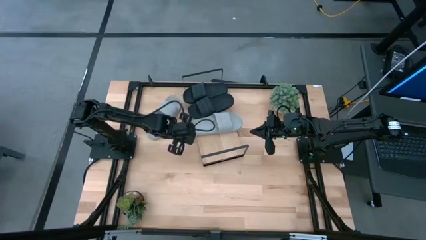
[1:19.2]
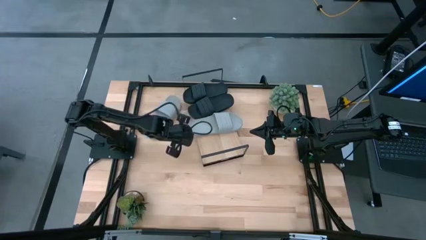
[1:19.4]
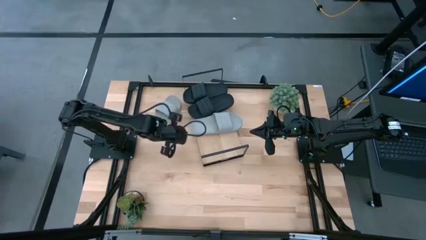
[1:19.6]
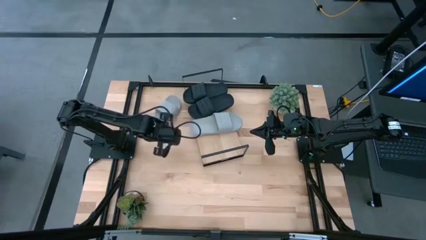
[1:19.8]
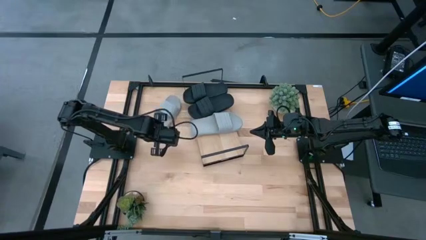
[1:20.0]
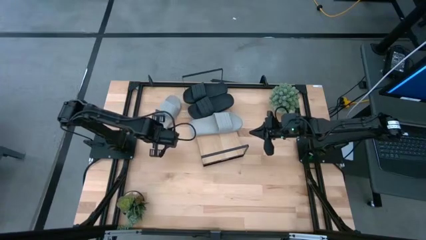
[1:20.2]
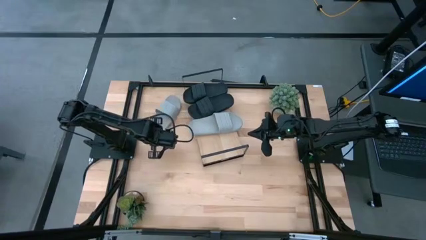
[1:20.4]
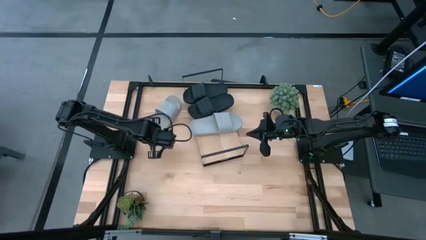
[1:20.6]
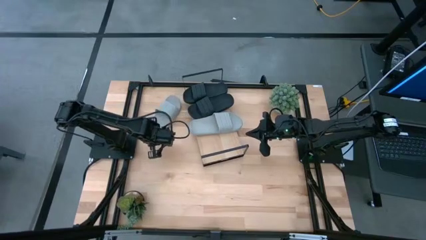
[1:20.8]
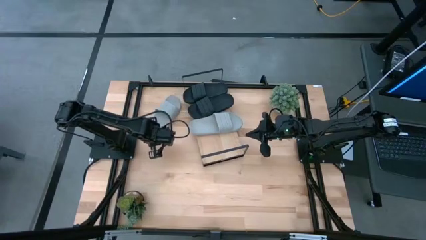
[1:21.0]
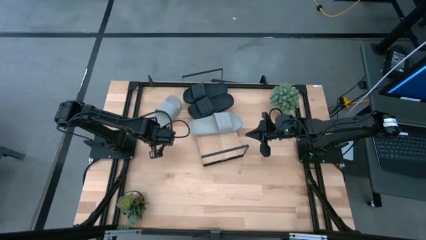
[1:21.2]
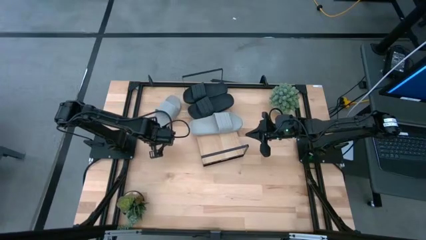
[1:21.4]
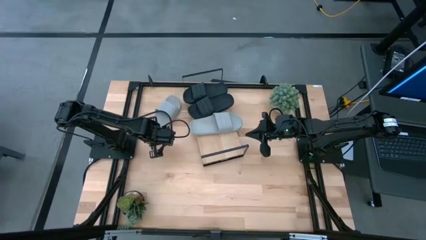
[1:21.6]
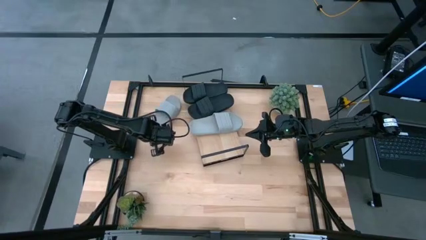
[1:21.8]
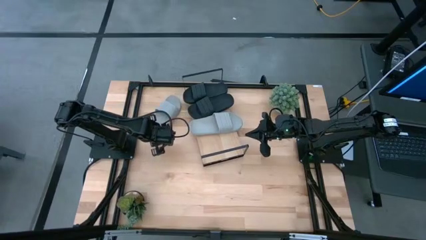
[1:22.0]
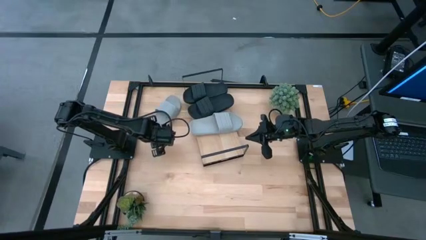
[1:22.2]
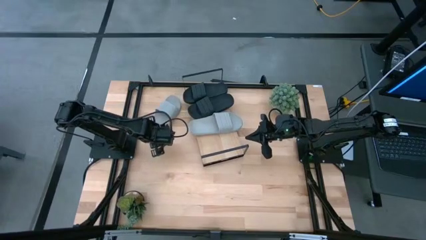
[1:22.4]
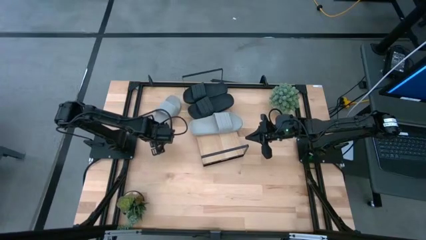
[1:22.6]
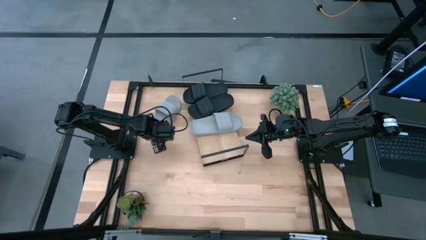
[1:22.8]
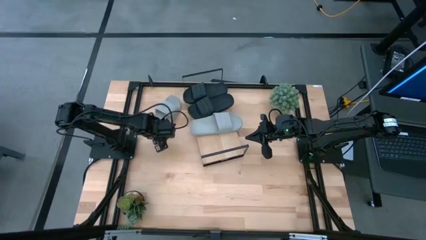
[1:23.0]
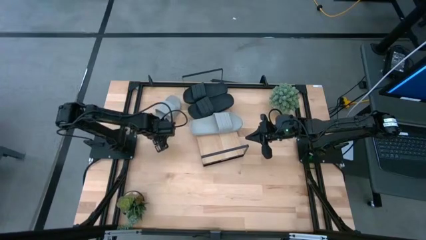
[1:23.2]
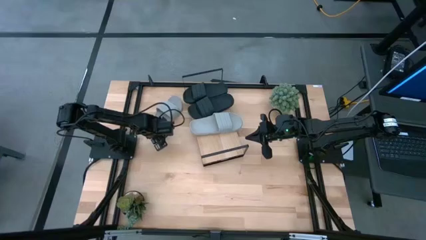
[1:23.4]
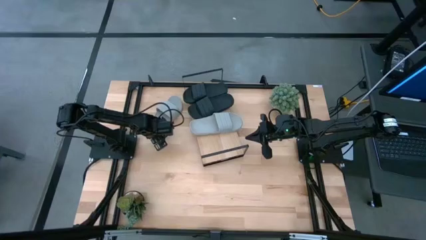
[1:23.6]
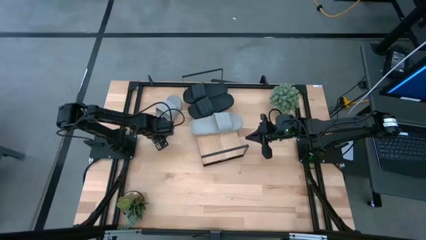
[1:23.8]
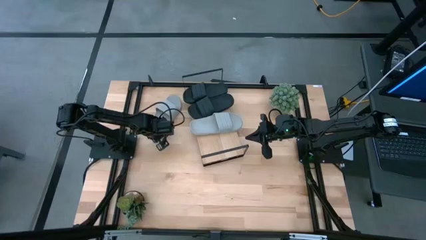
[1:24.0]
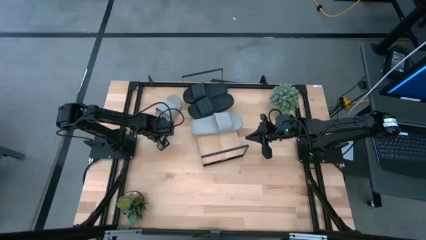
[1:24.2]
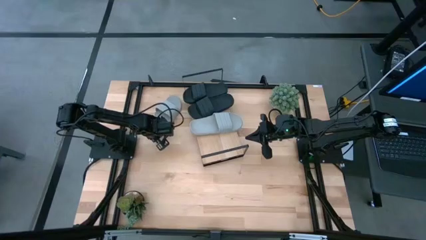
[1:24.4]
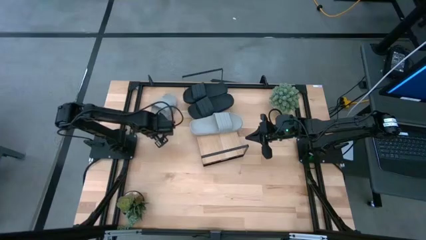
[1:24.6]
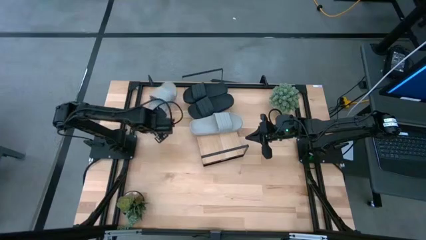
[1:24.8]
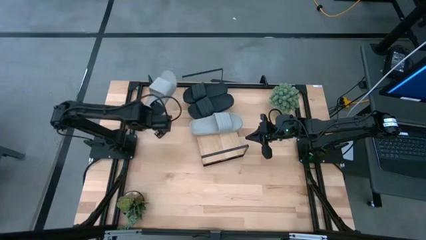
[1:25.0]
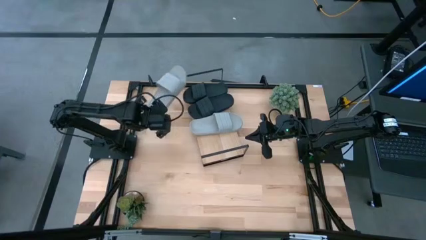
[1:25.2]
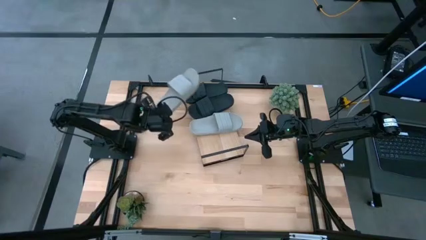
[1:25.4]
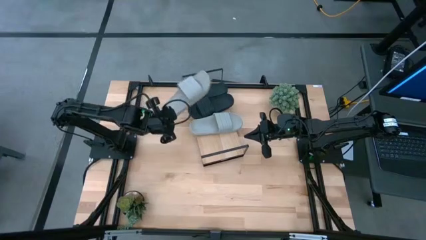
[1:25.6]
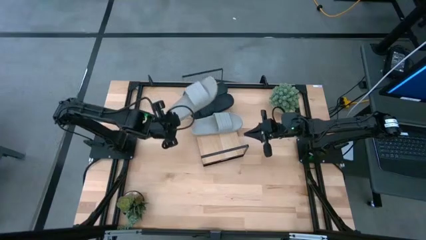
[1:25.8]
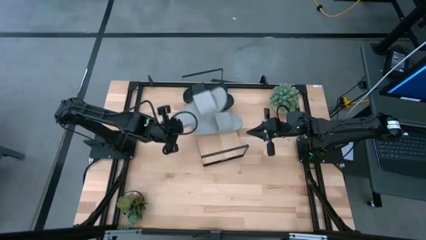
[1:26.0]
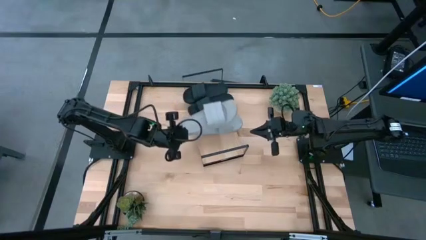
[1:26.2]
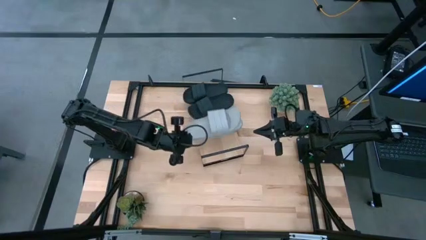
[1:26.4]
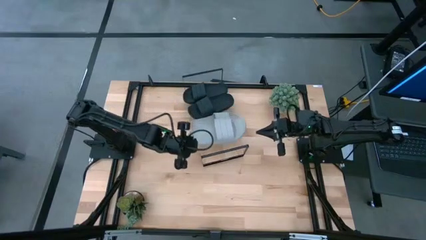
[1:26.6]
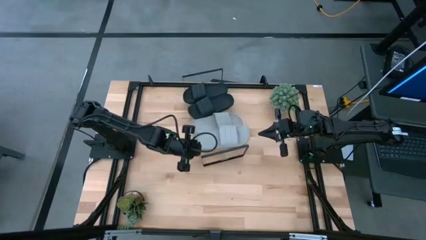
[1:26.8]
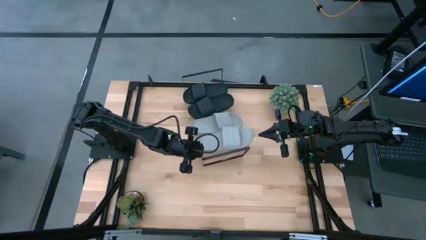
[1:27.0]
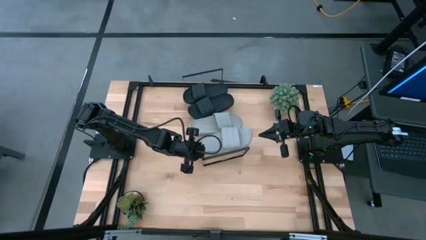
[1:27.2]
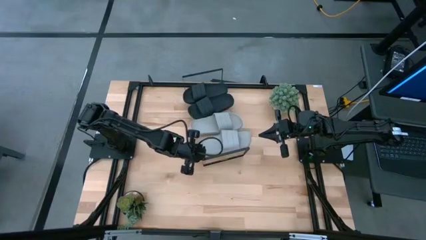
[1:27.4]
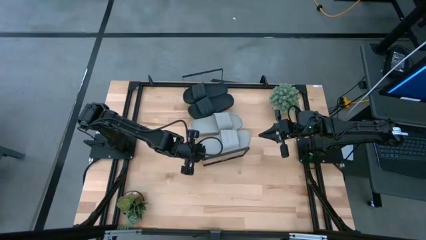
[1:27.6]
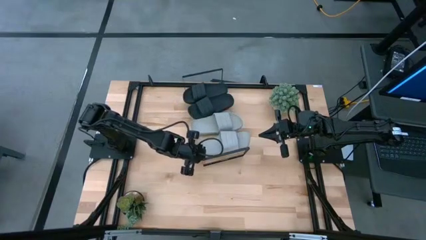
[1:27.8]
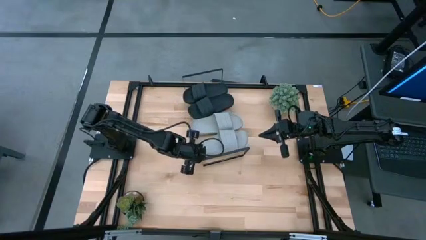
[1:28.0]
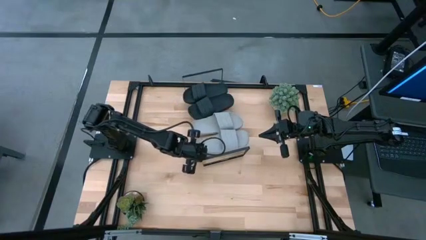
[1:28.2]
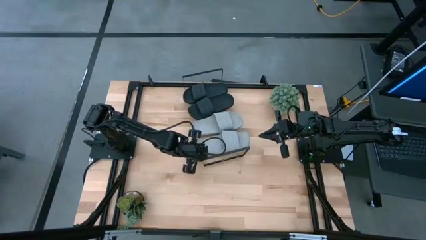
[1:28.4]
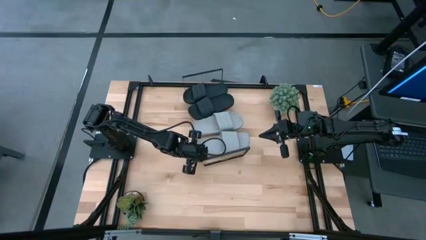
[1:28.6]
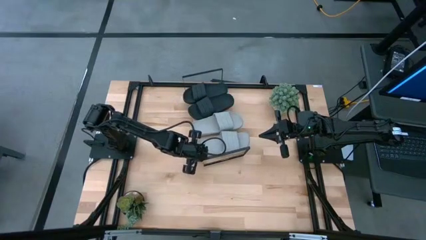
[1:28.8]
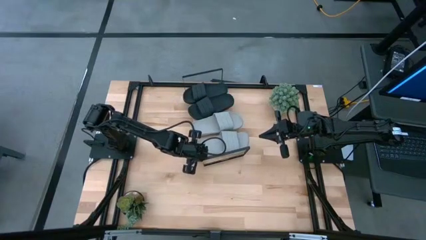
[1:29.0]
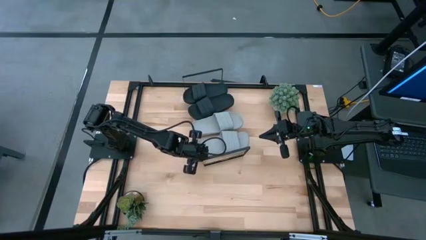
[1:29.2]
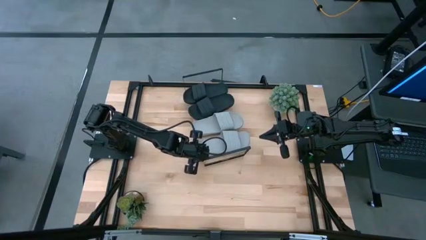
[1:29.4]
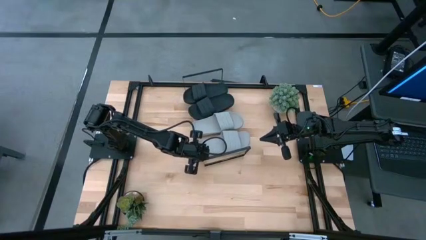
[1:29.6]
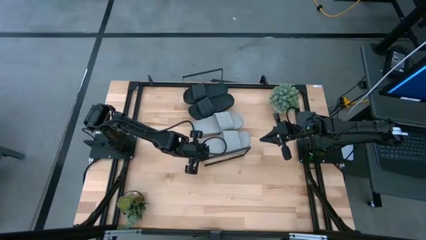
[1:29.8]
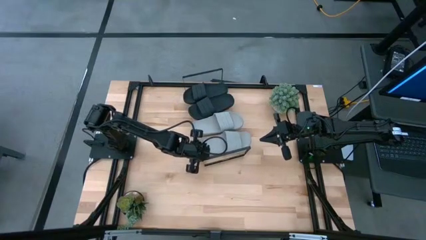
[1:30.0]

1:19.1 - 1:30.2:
Task: Pick and place slides into the shelf
Put the gray slide on the shelf

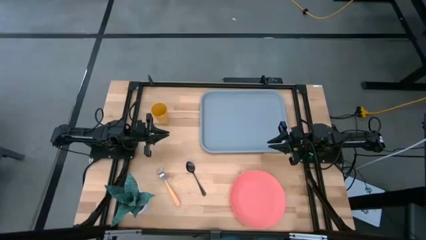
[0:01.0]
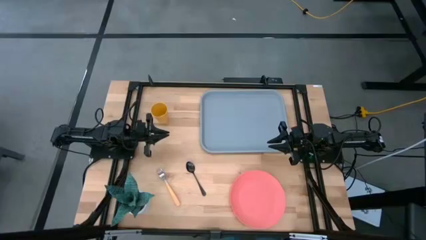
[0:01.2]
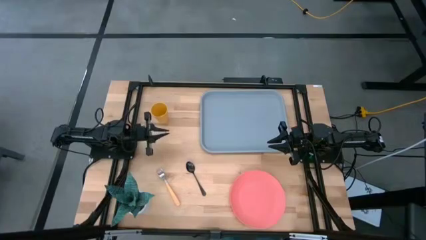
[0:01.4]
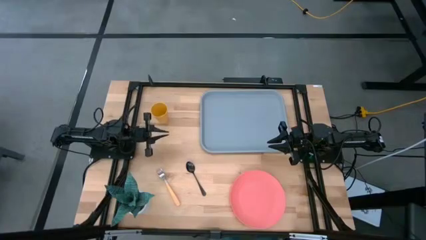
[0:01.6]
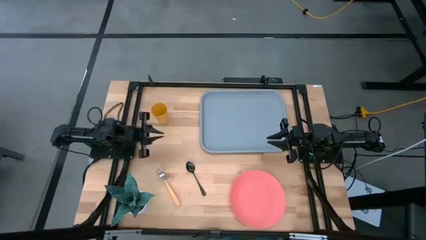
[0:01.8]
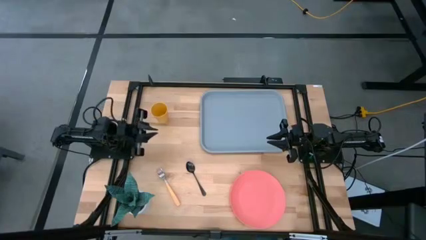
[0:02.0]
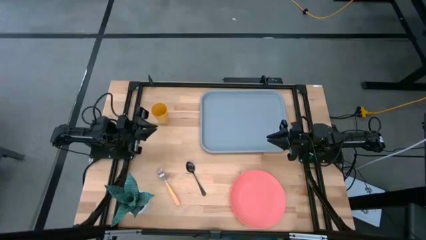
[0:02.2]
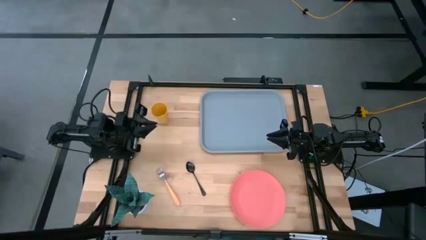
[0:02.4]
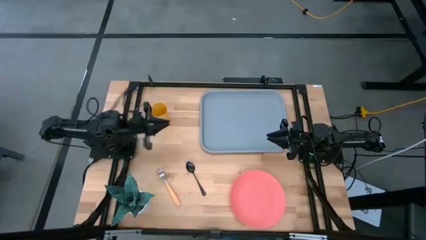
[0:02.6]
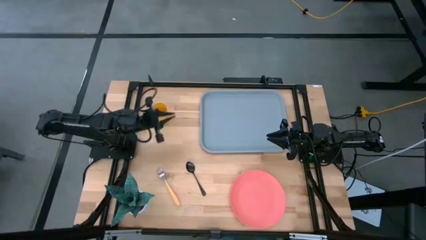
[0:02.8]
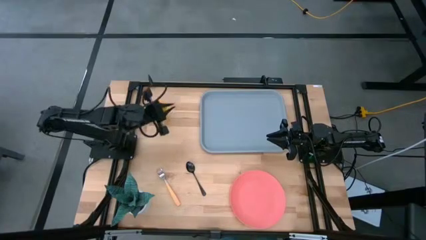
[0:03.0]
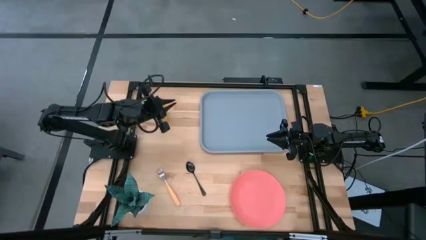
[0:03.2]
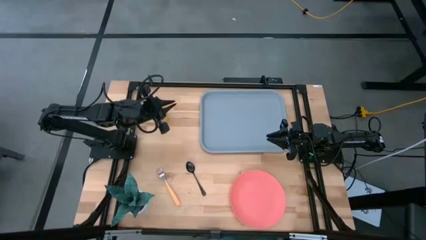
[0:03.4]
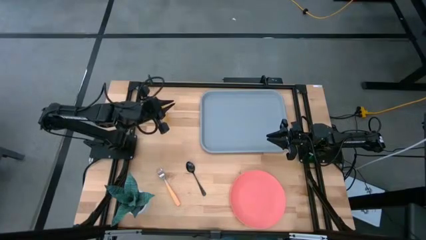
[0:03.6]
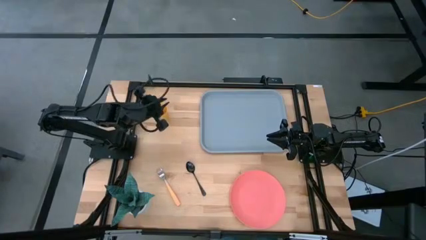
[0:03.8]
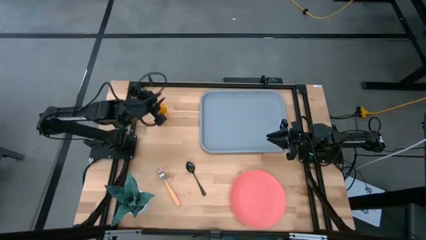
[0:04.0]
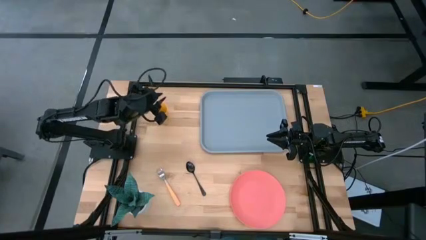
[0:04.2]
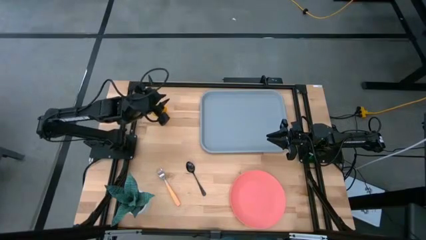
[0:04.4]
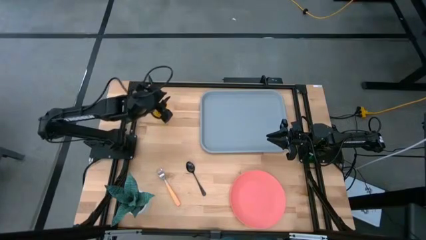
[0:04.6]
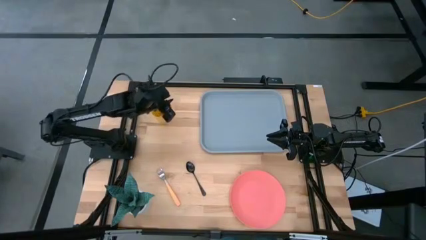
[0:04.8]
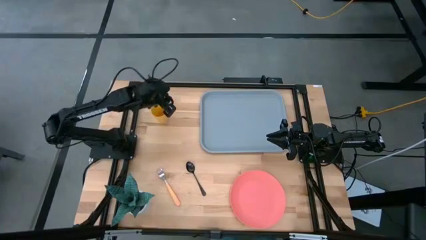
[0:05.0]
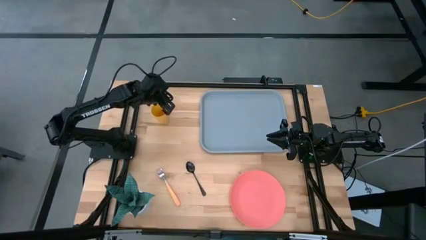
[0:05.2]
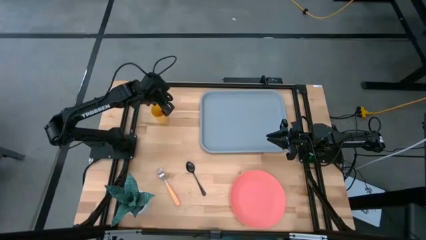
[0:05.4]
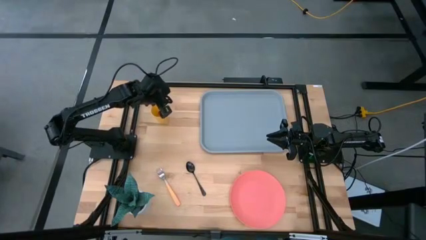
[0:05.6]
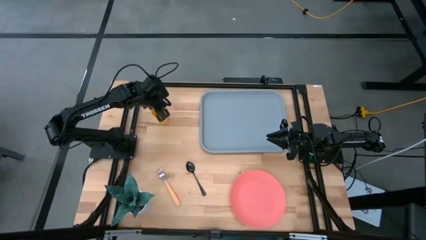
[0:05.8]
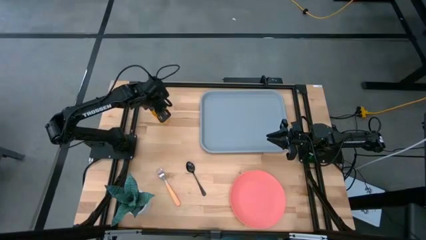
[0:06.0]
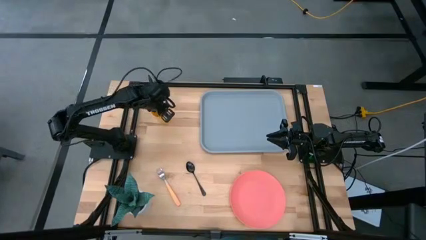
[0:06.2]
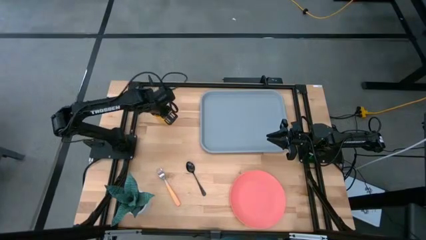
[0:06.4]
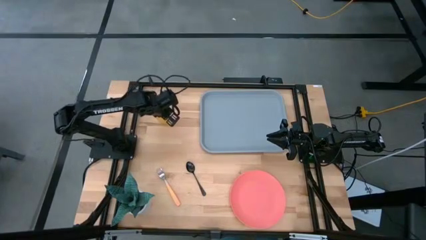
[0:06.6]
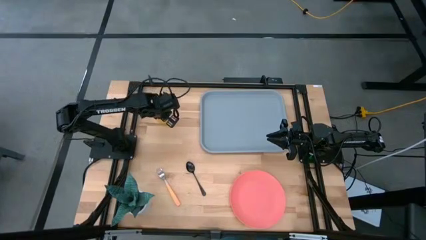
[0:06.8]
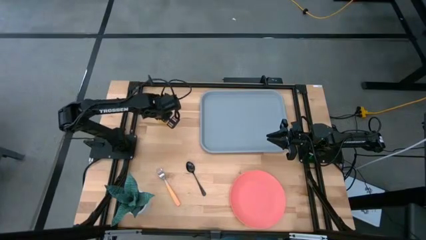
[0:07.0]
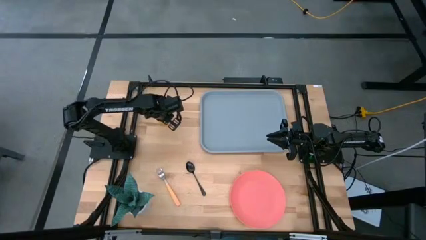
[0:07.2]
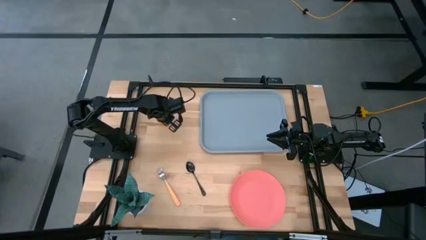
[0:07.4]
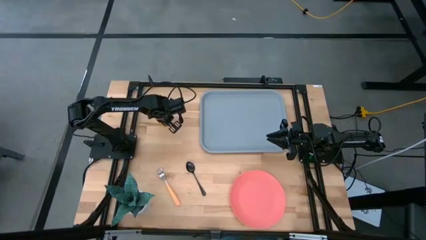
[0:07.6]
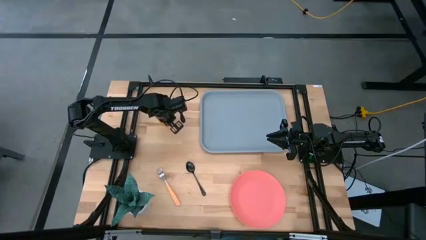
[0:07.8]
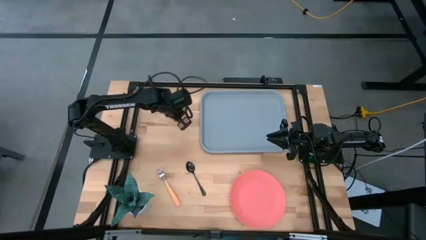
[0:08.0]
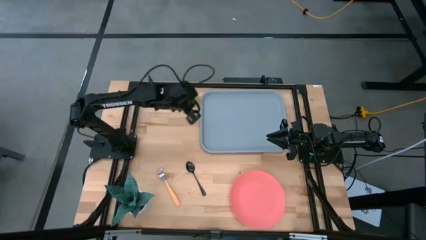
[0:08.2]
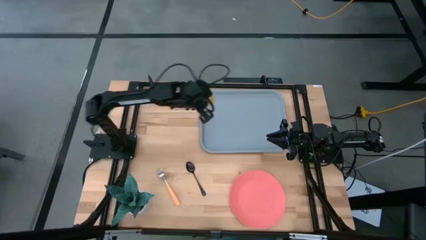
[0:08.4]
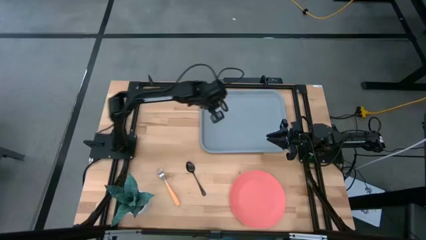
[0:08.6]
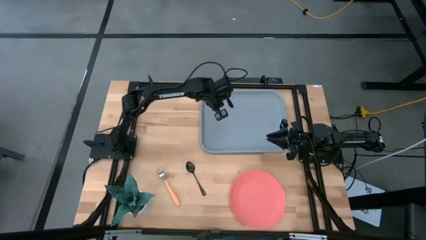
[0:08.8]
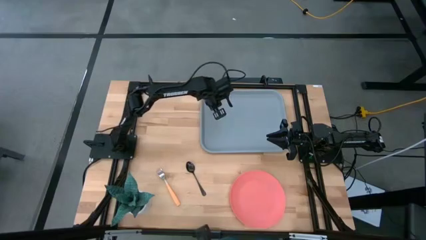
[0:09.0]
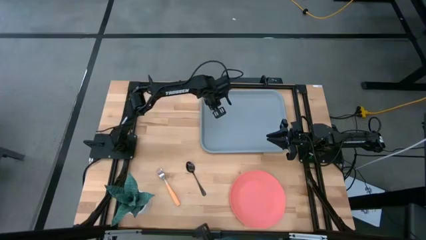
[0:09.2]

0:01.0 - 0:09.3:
Task: Pick and place plate/cup/fork/spoon on tray
Put the yellow cup on the gray tray
